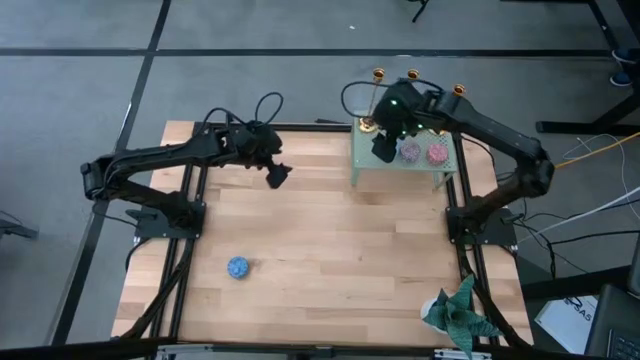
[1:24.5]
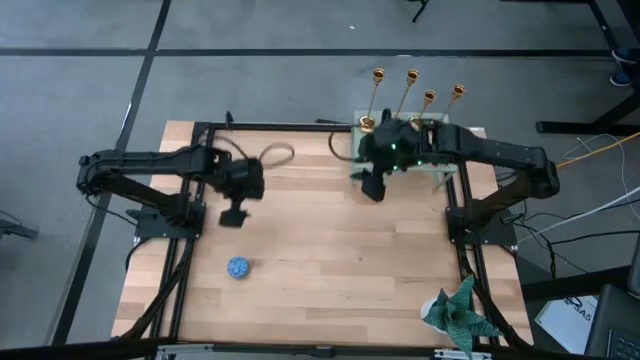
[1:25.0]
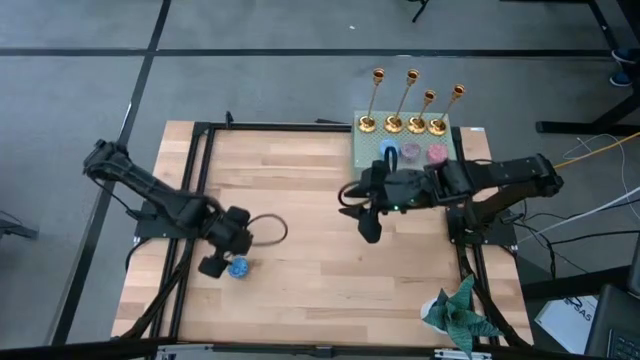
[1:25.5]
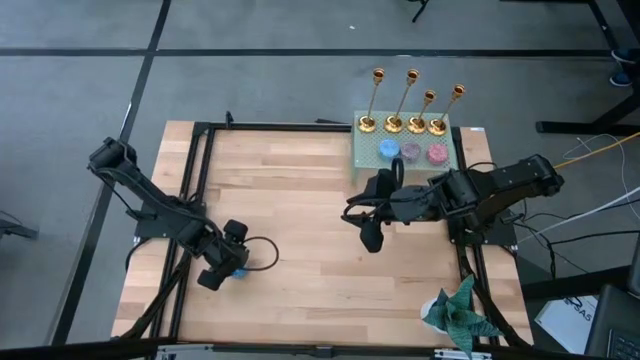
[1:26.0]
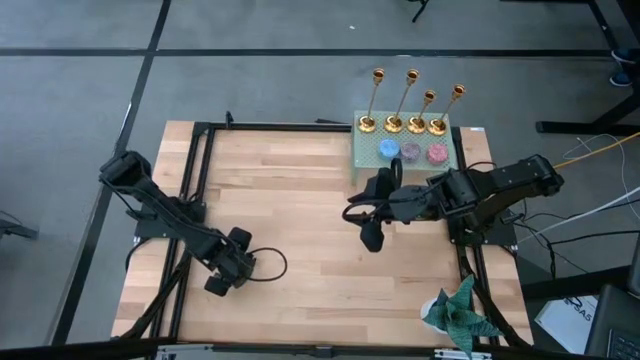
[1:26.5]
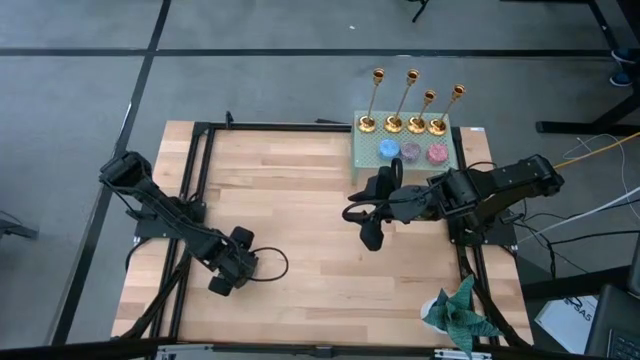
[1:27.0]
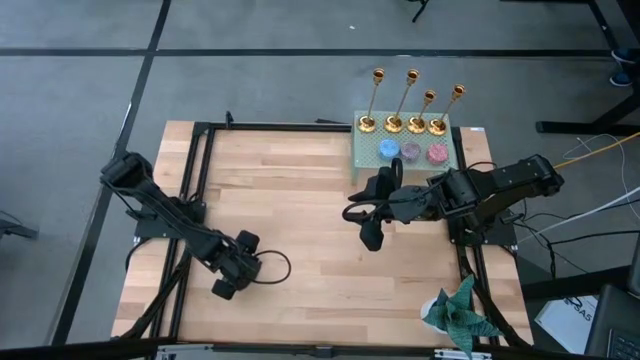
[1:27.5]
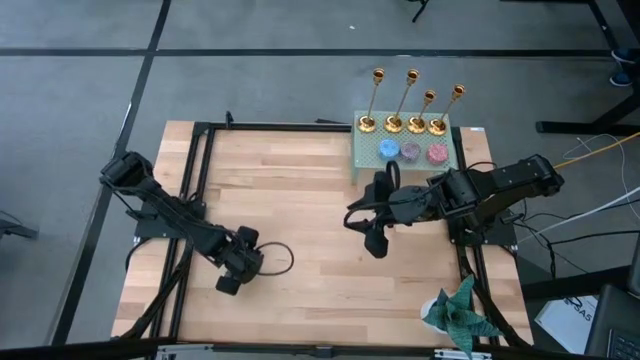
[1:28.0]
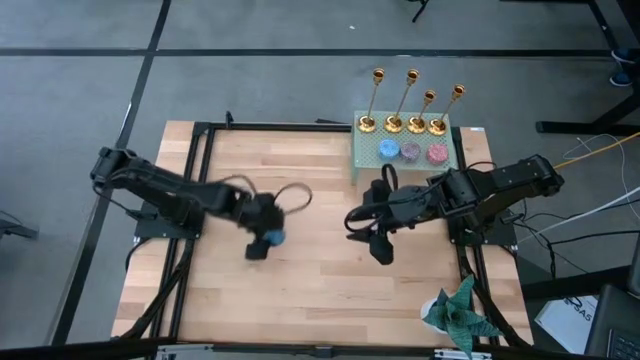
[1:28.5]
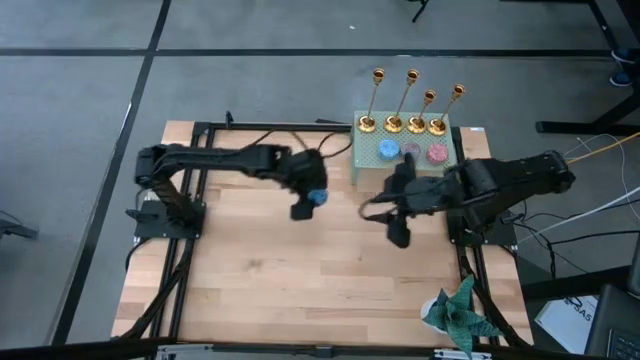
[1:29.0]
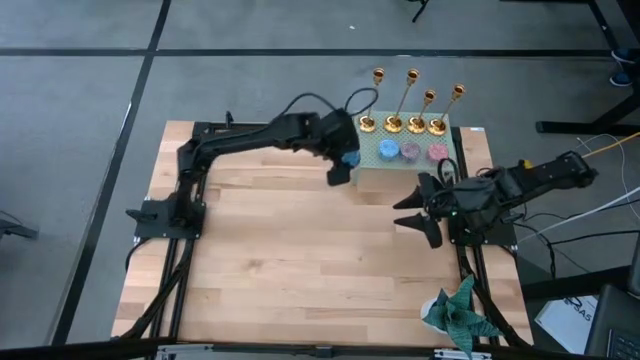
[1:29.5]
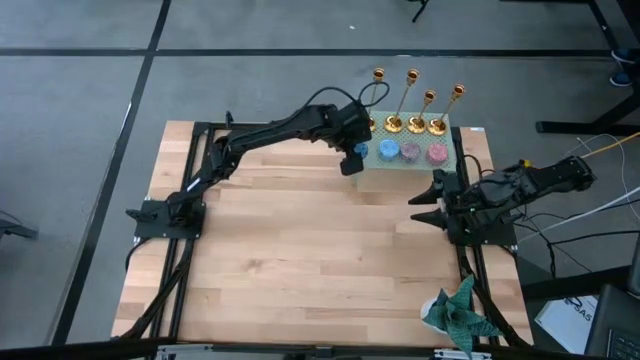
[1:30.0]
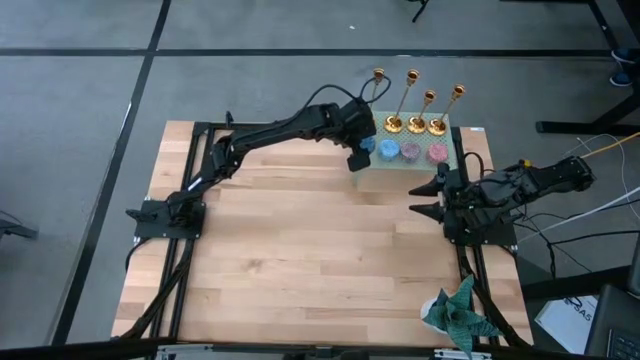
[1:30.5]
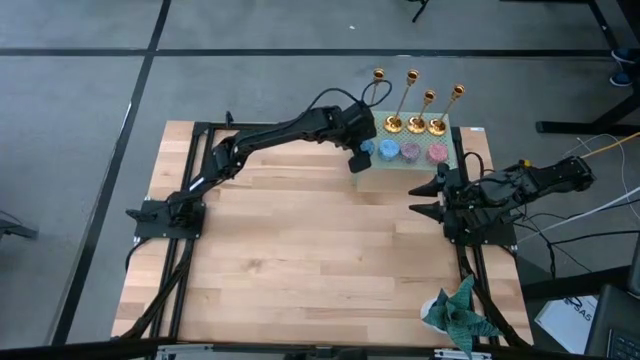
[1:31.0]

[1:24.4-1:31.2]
Task: Pick & Place candle stick holders
Put the blue scented candle on the shelf

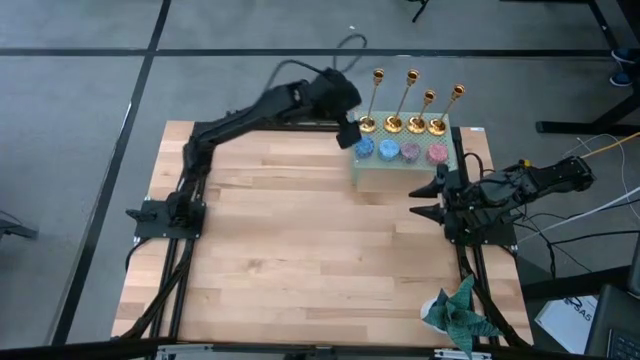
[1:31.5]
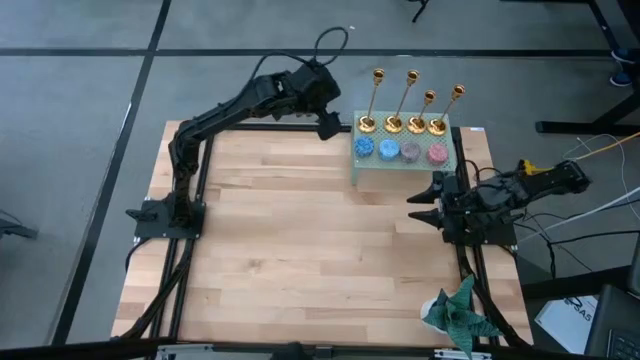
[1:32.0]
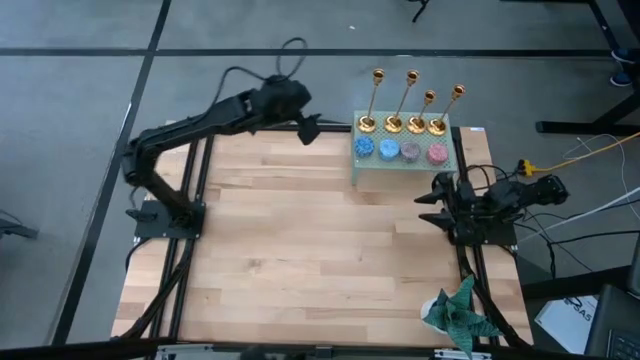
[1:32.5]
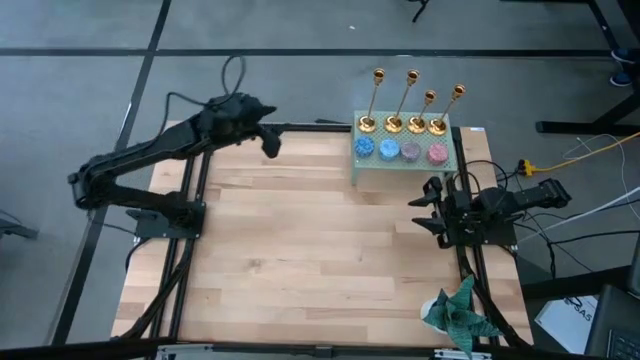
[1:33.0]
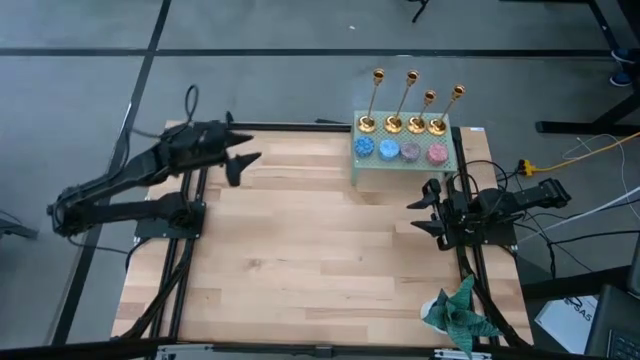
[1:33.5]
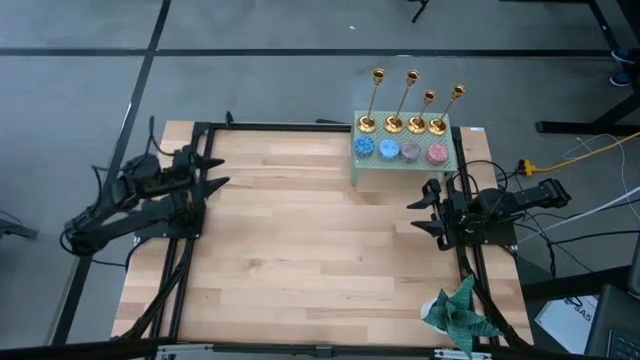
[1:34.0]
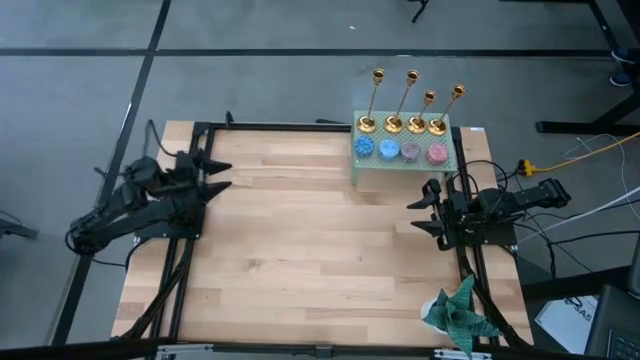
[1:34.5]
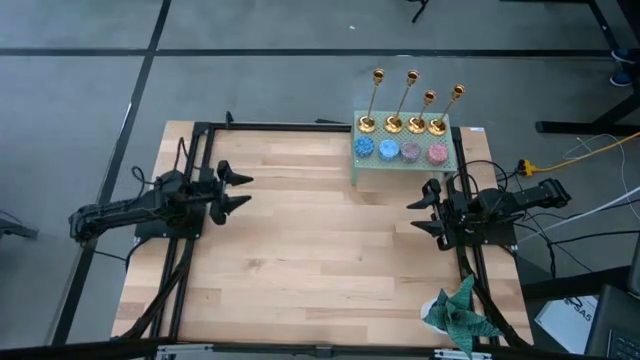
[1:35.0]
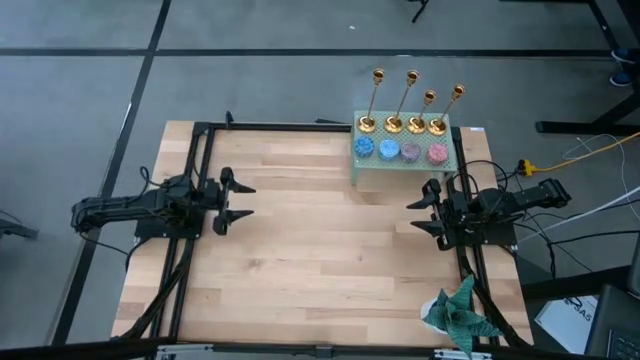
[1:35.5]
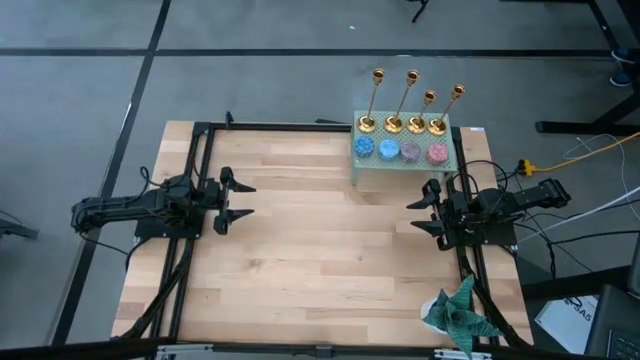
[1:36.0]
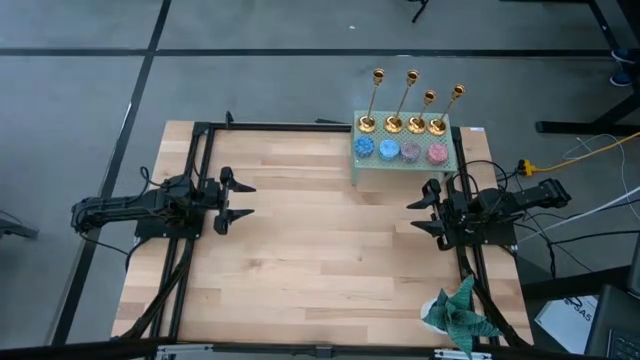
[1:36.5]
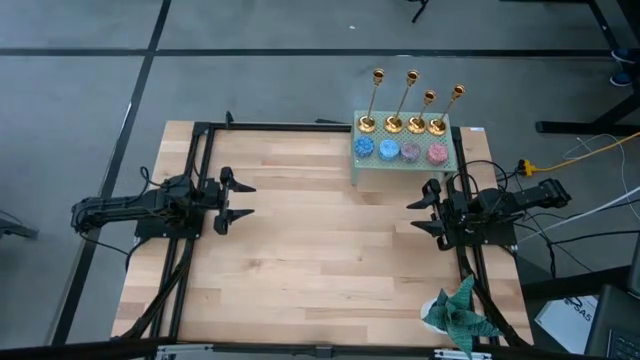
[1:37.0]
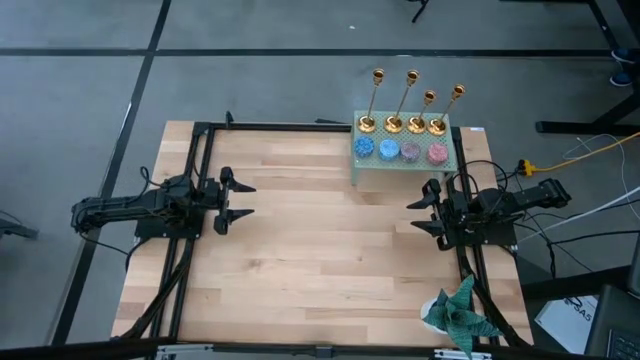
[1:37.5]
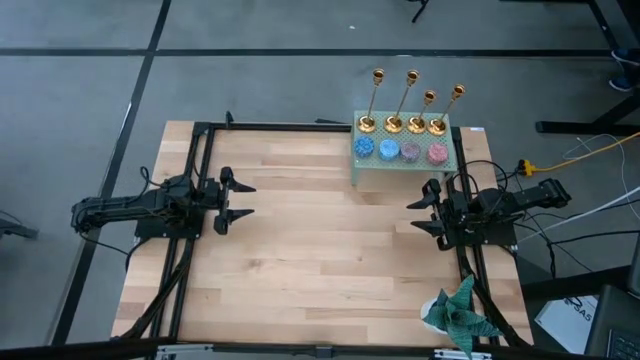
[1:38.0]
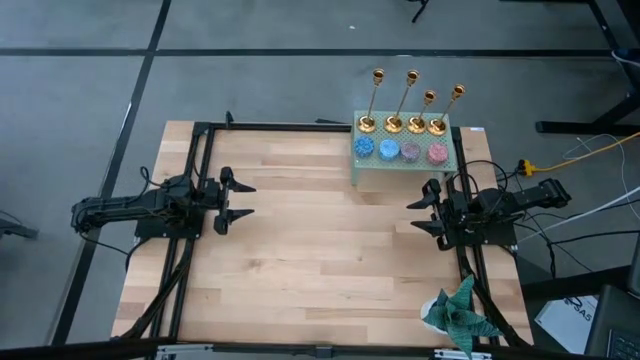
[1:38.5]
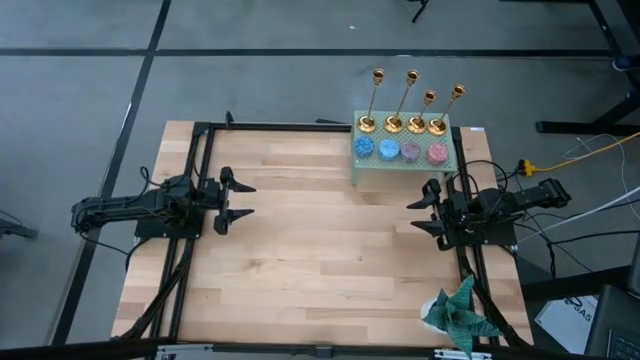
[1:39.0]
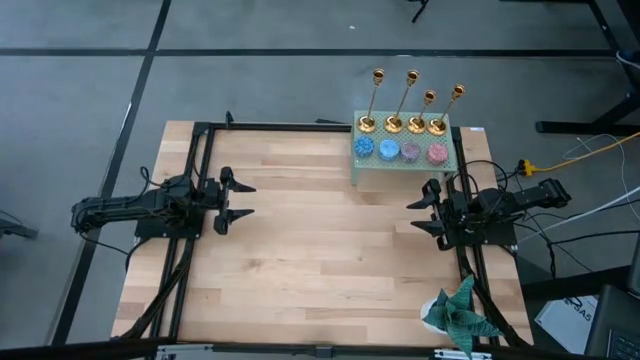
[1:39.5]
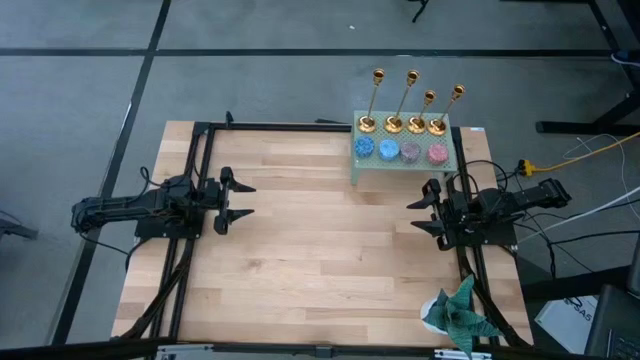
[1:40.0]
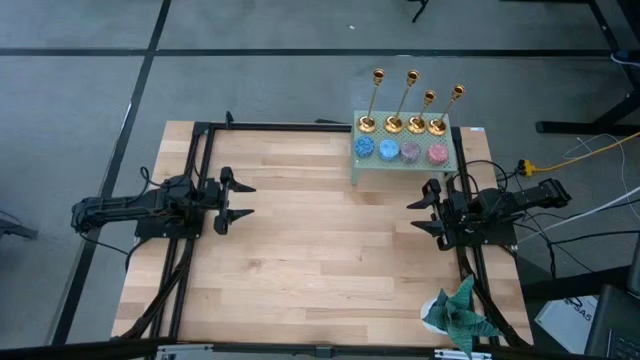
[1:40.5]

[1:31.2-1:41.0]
Return to Home Position
